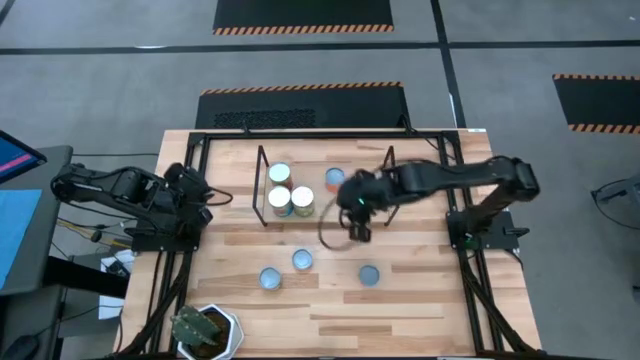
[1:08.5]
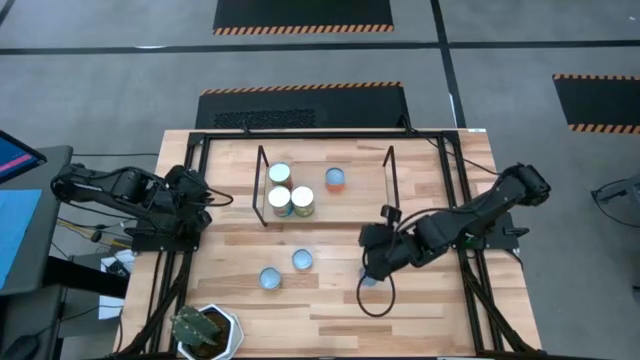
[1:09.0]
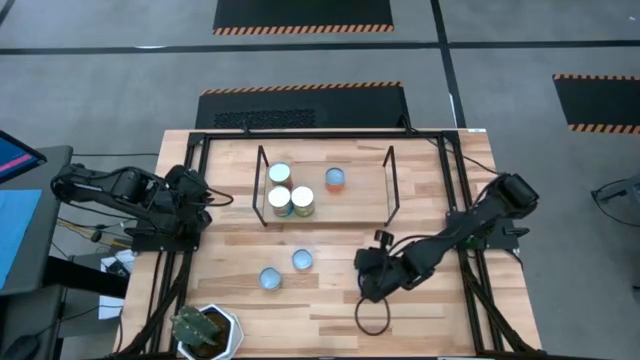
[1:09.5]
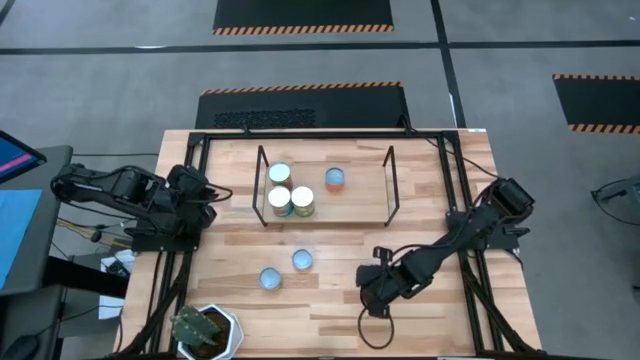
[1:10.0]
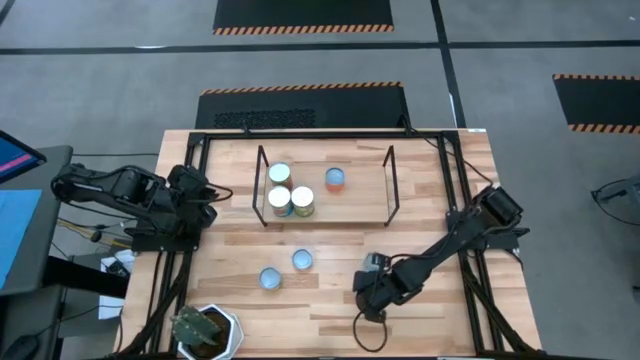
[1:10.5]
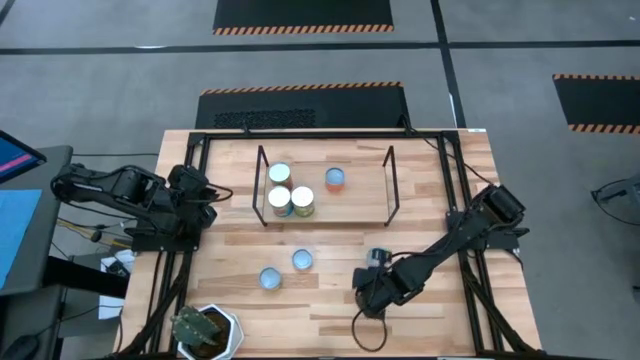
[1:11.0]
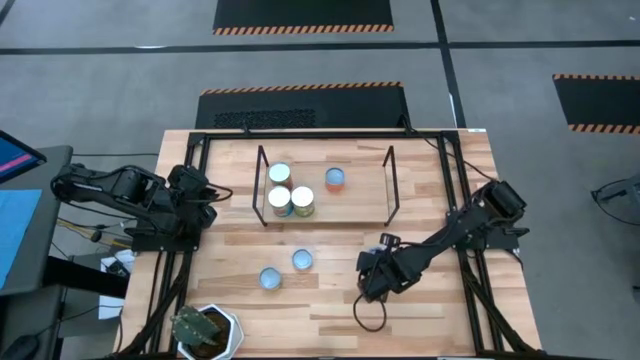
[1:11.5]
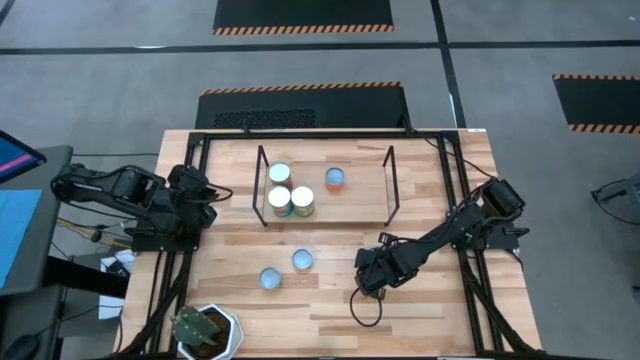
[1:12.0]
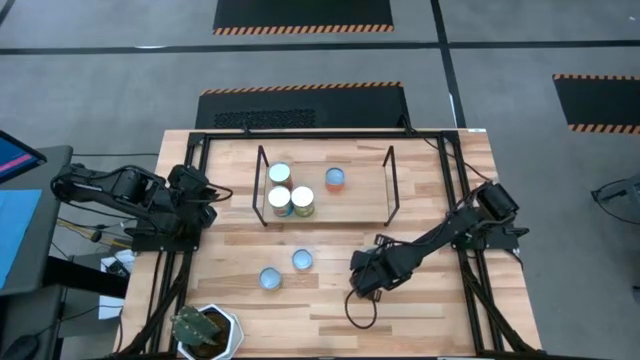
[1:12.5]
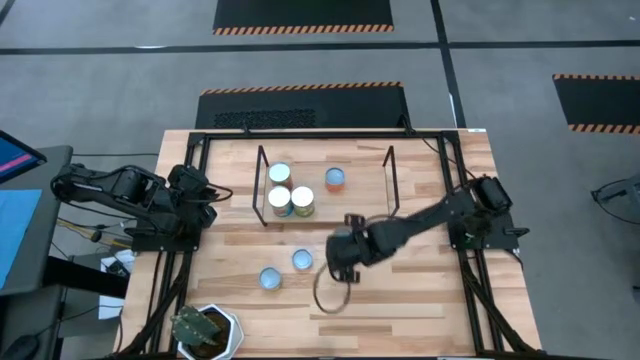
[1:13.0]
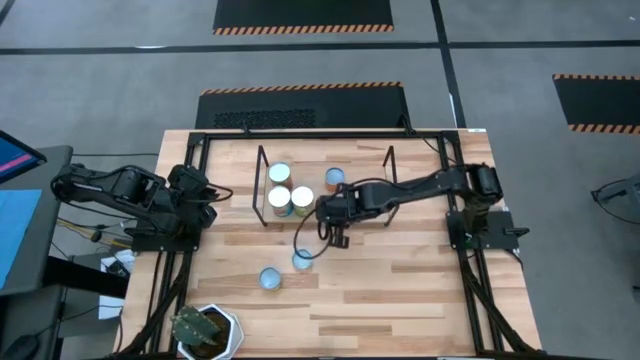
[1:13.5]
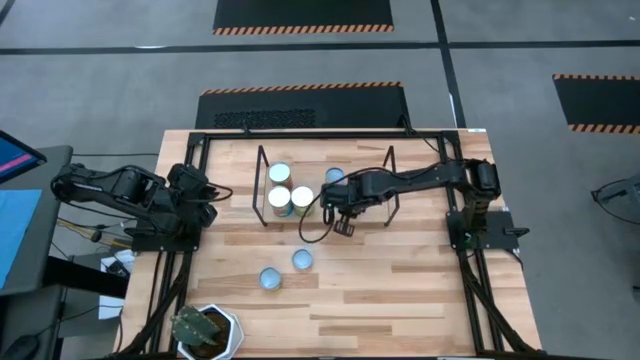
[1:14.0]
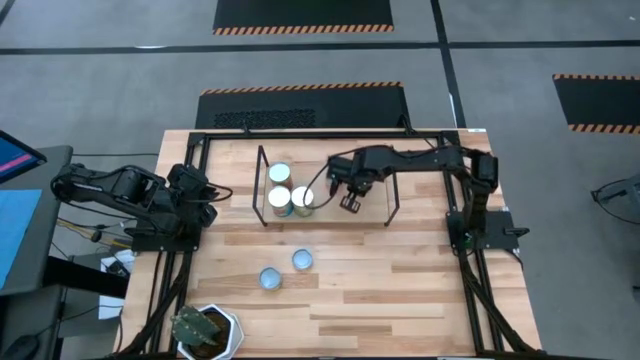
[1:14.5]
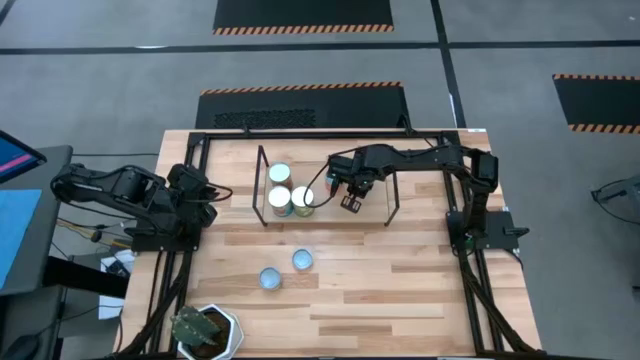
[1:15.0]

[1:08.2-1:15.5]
Task: Pick and place cans onto a shelf
Put the canned salmon on the shelf

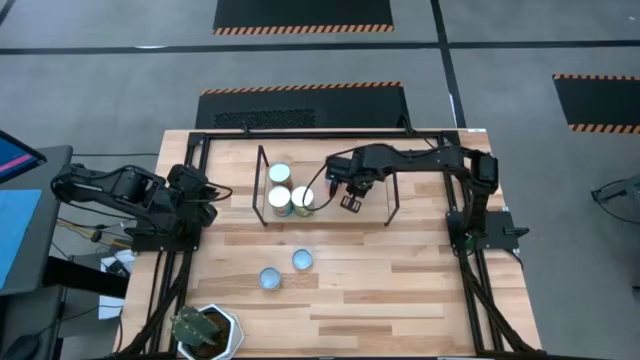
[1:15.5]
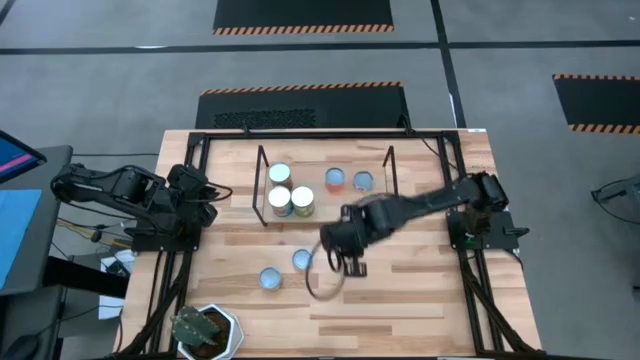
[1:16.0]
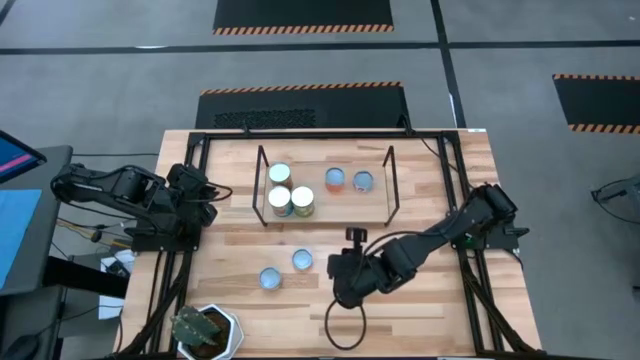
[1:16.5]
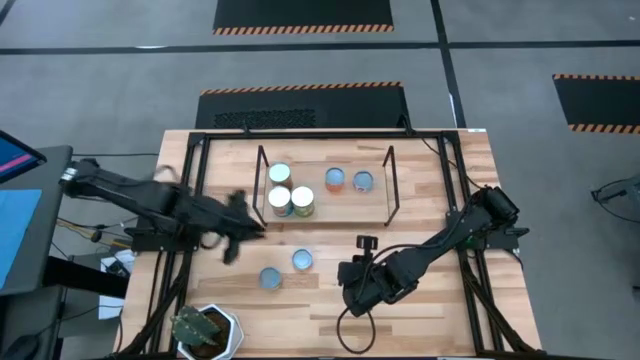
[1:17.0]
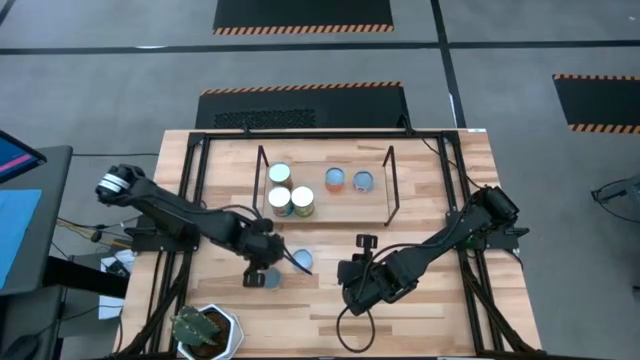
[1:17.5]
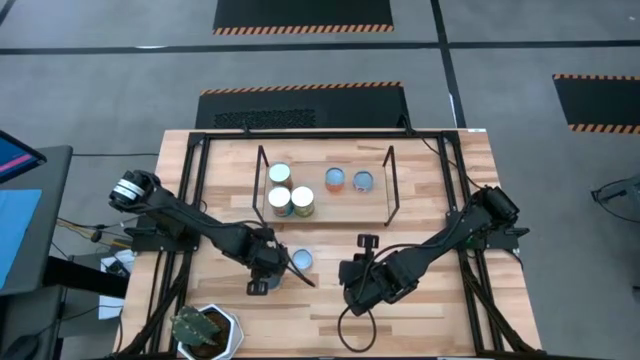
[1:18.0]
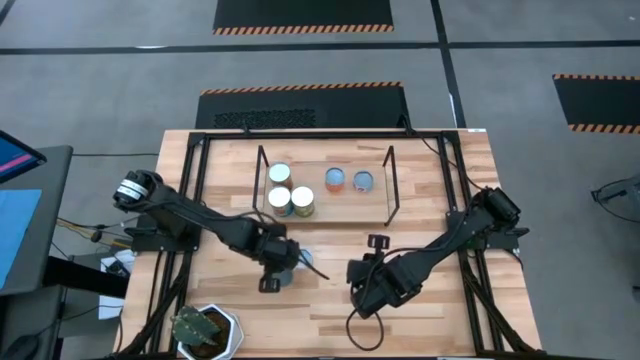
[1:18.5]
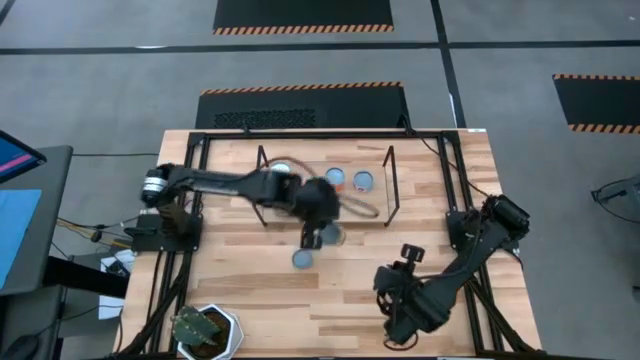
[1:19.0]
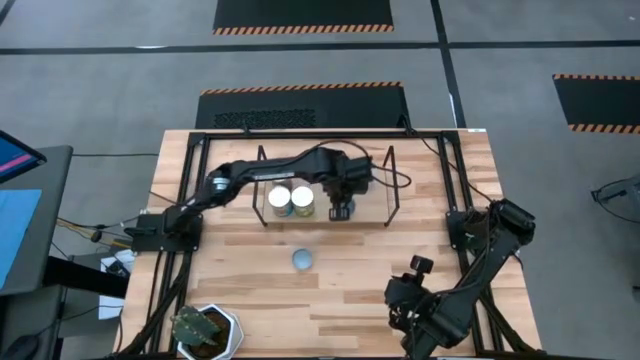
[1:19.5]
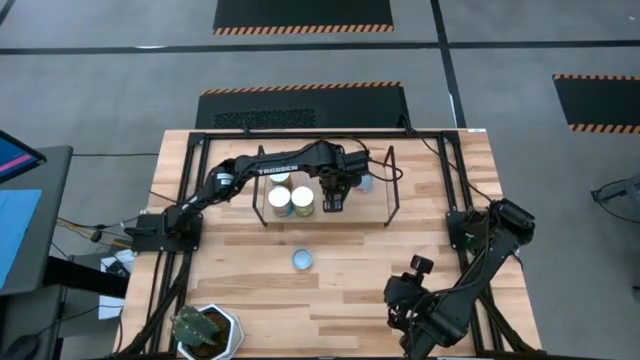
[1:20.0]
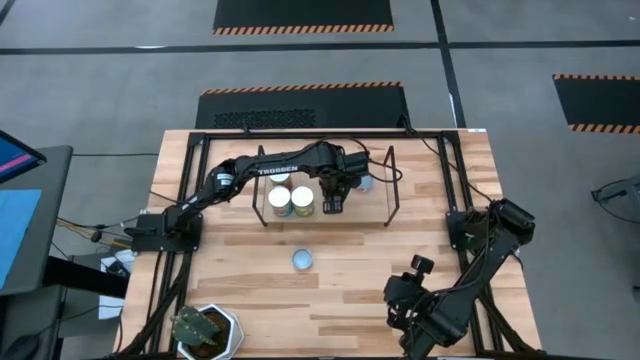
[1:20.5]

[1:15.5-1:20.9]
Put the green canned goods on the shelf

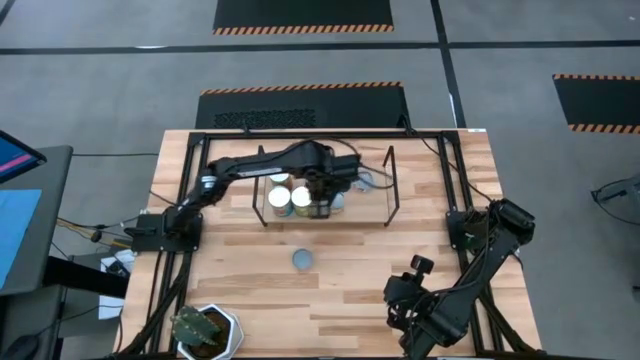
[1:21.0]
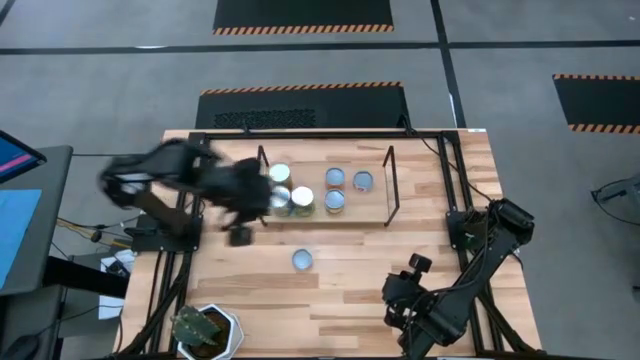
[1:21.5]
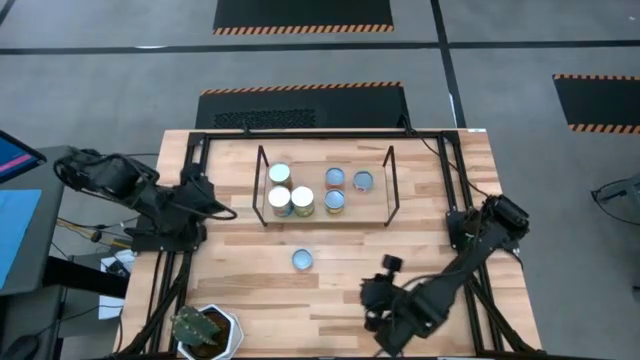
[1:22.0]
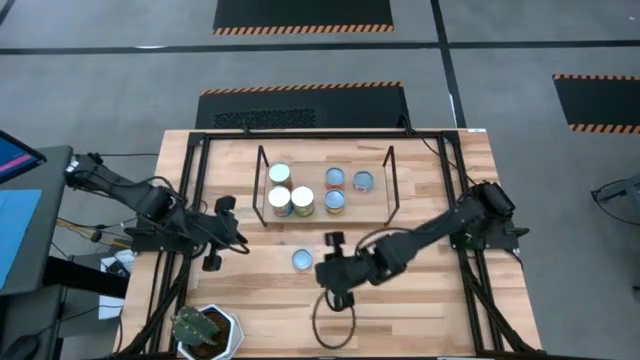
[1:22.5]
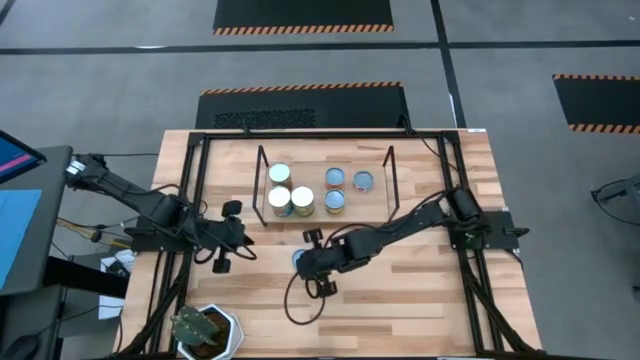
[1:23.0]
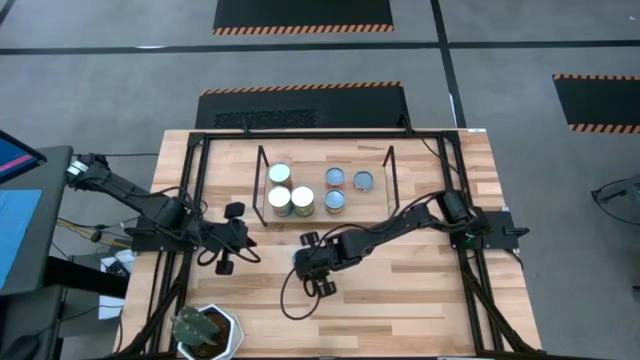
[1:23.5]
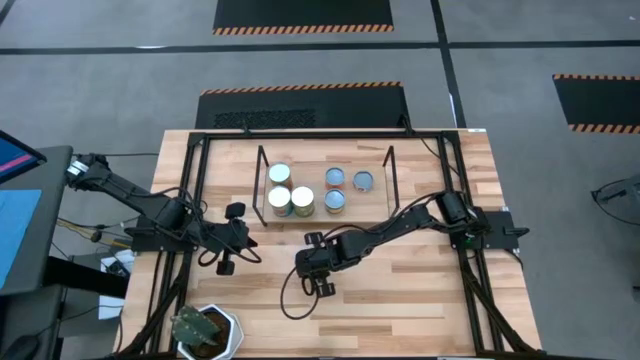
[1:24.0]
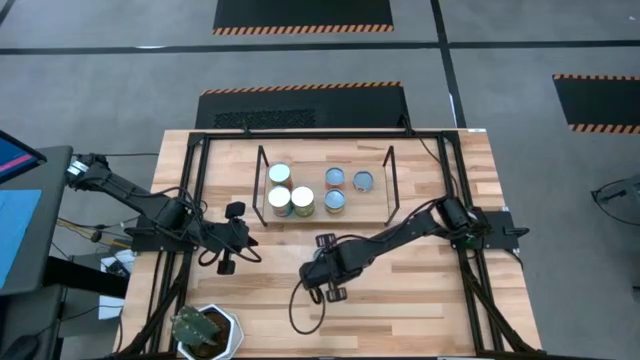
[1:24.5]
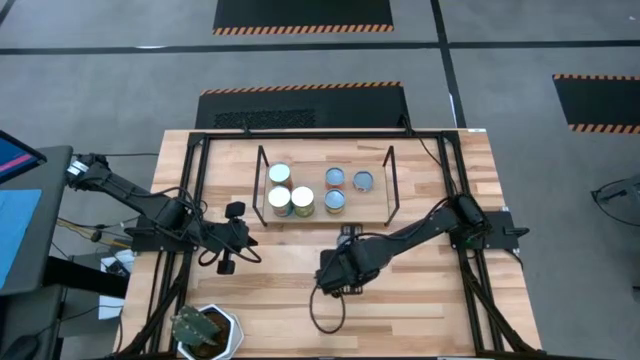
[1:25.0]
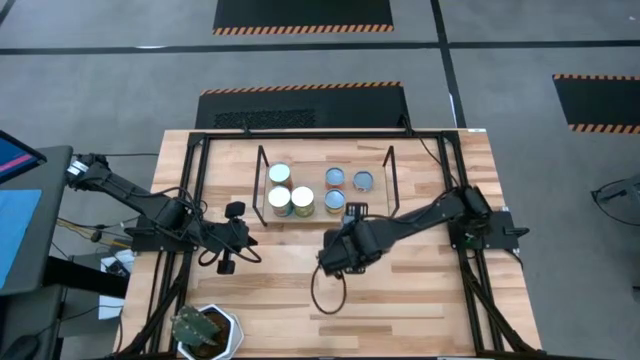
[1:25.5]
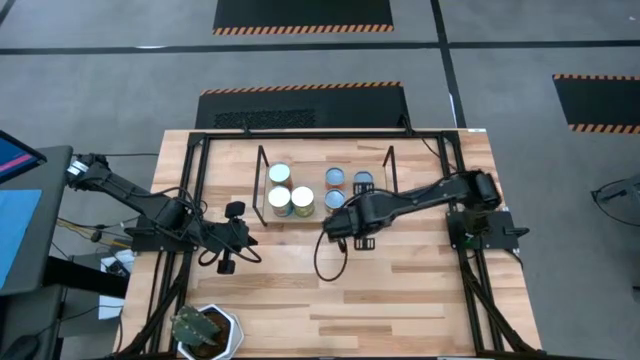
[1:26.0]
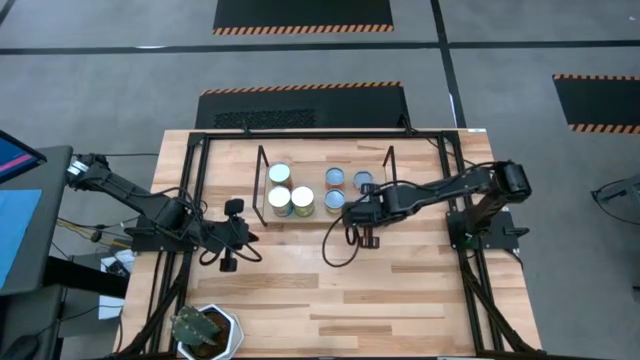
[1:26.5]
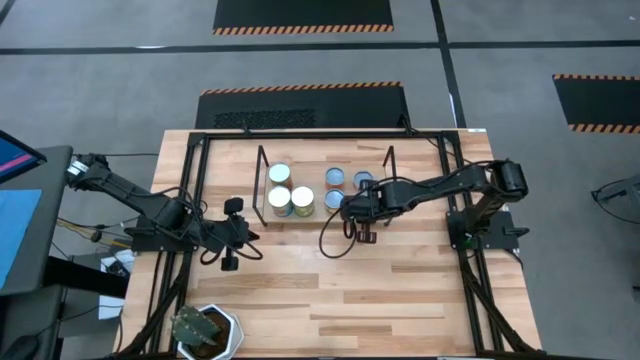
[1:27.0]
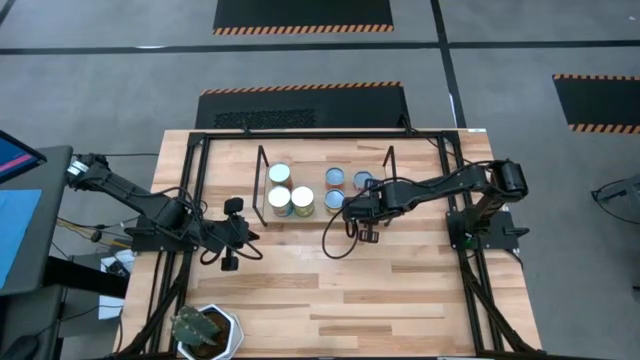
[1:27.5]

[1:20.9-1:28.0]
Put the canned pineapple rings on the shelf

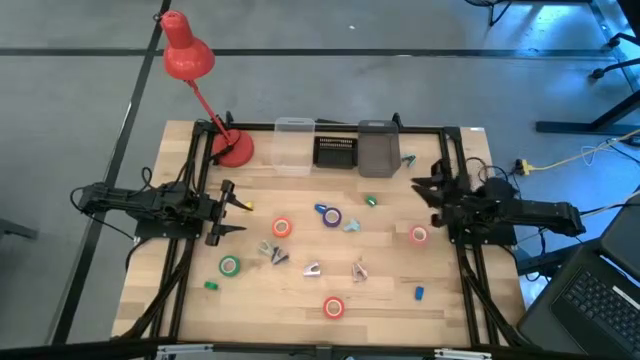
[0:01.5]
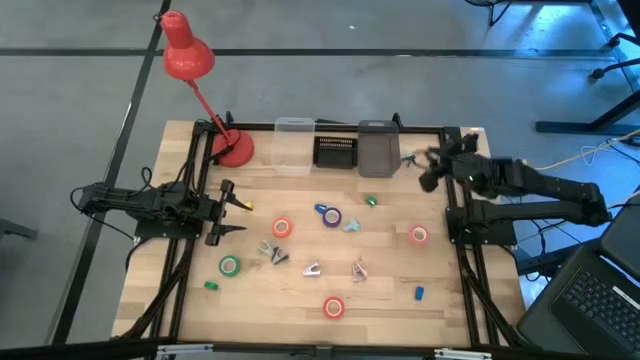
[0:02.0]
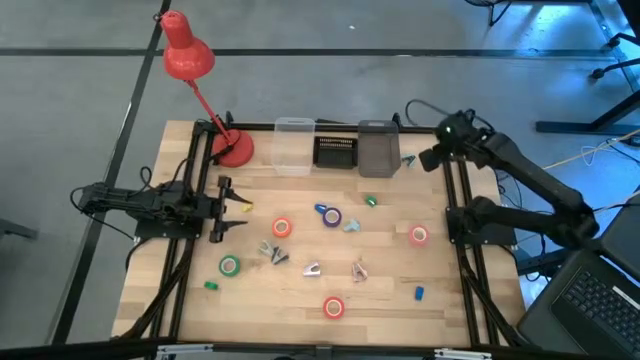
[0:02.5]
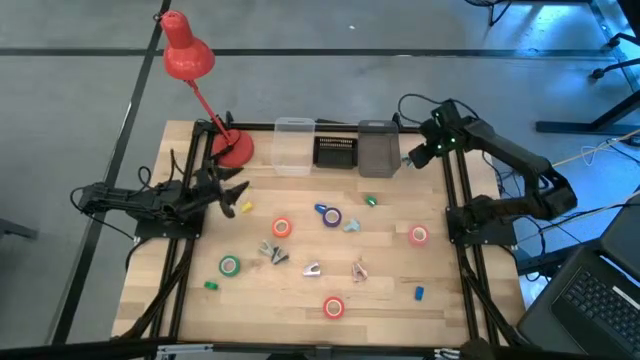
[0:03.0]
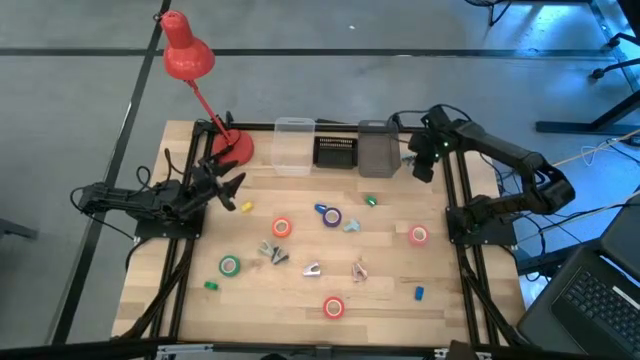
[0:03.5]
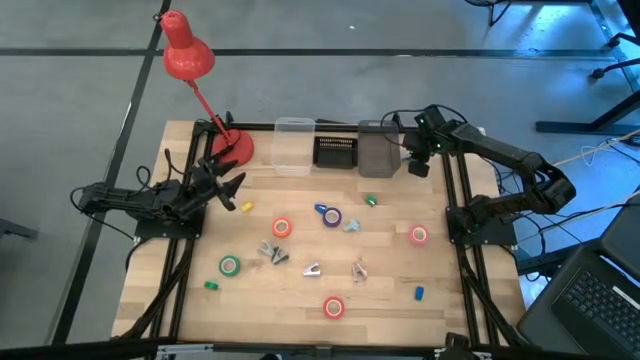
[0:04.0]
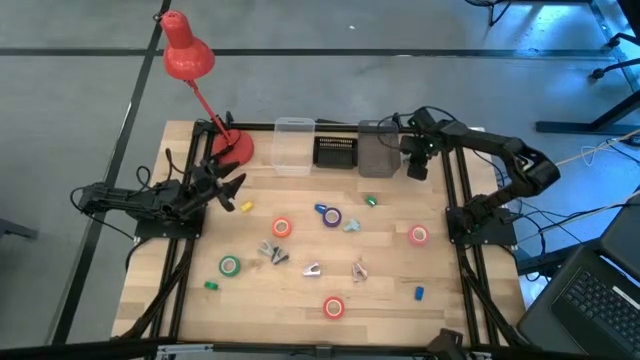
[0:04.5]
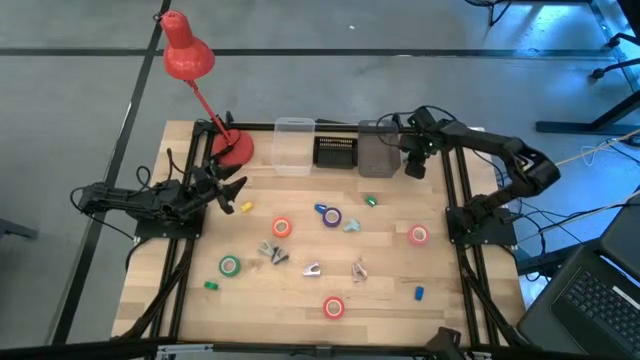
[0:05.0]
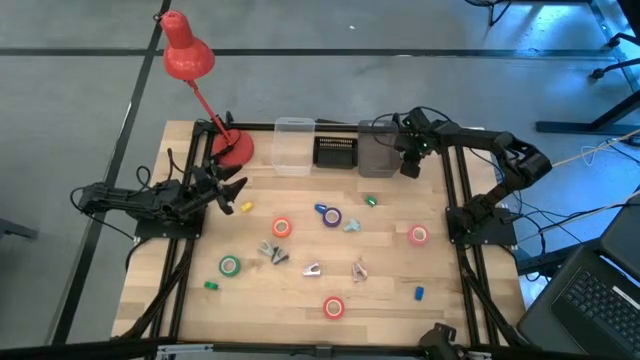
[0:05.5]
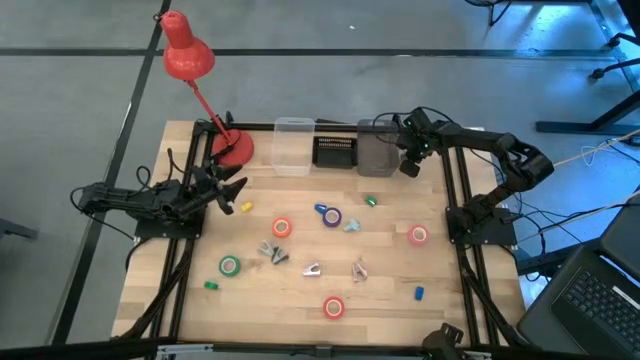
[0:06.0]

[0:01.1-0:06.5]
Task: Pick and place Stapler, Stapler remover, tape
Put the top blue staple remover into the right black bin
